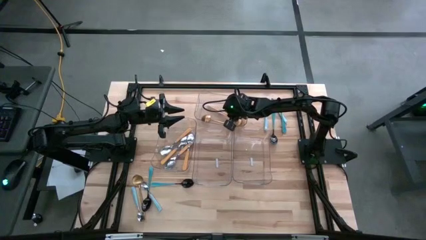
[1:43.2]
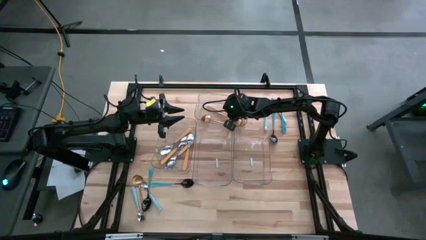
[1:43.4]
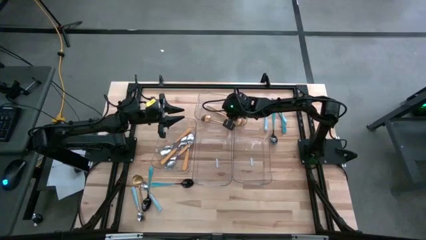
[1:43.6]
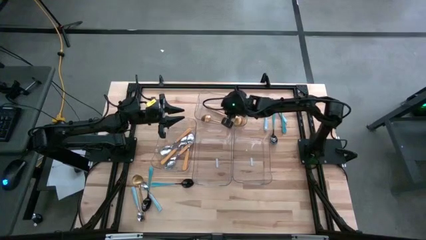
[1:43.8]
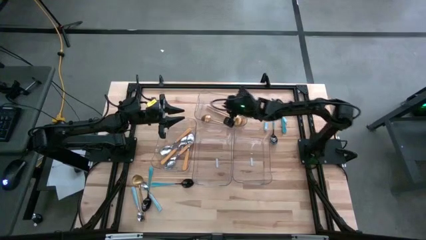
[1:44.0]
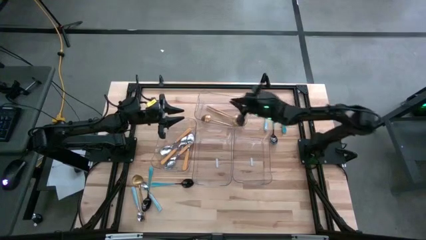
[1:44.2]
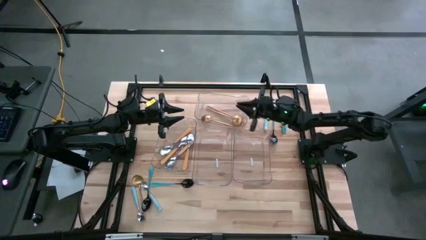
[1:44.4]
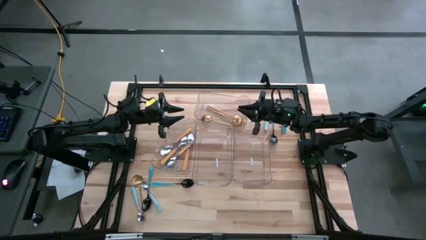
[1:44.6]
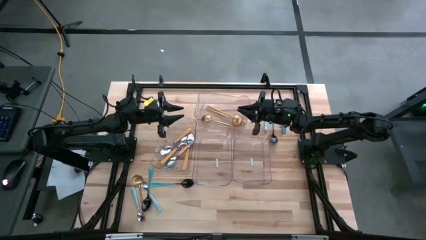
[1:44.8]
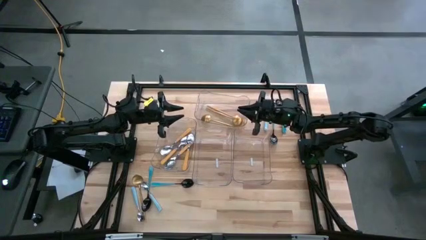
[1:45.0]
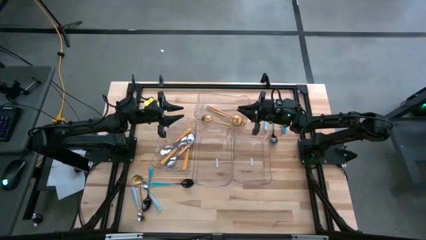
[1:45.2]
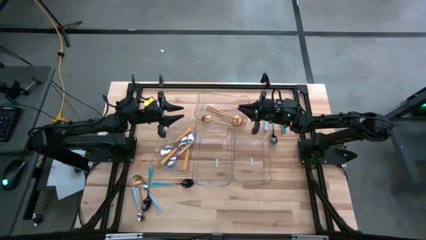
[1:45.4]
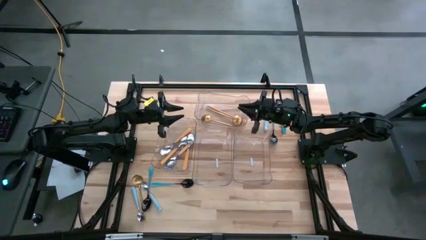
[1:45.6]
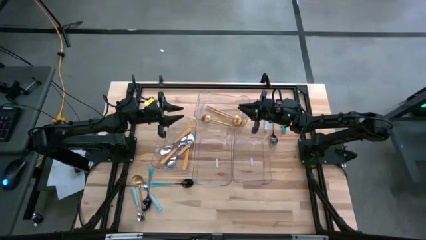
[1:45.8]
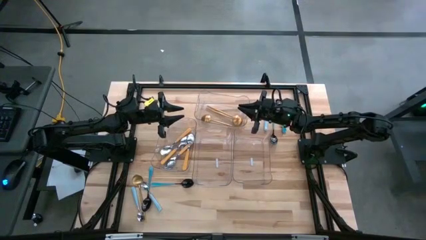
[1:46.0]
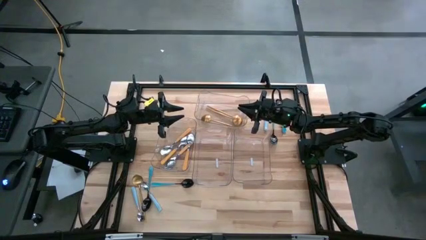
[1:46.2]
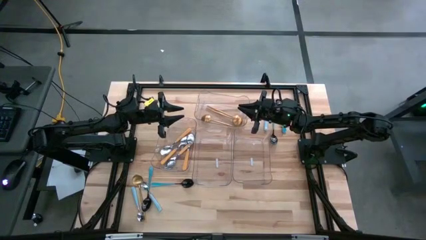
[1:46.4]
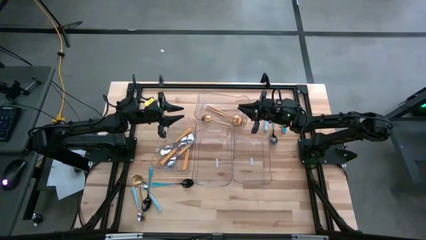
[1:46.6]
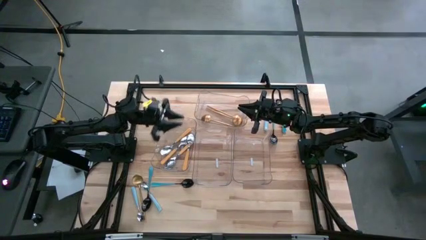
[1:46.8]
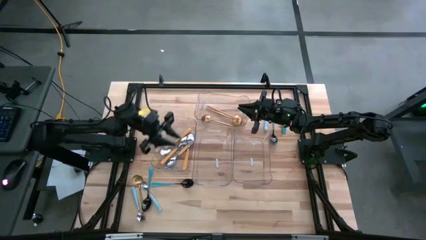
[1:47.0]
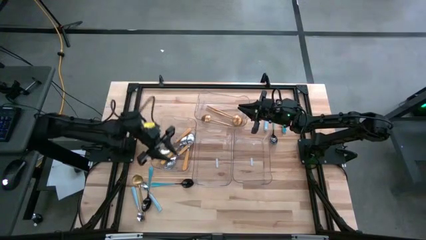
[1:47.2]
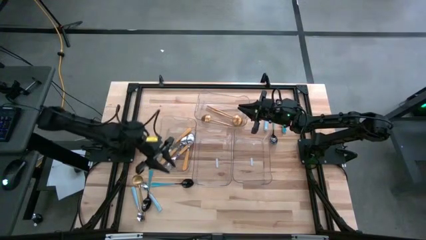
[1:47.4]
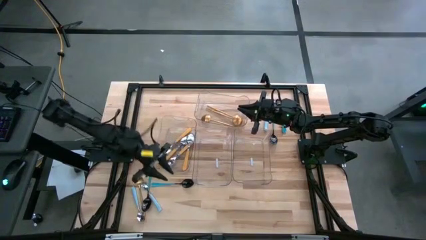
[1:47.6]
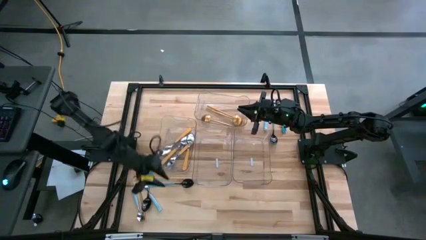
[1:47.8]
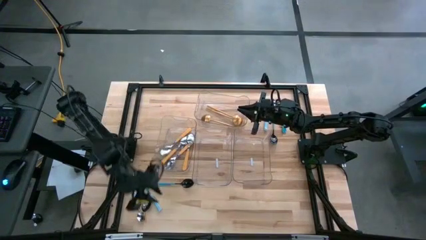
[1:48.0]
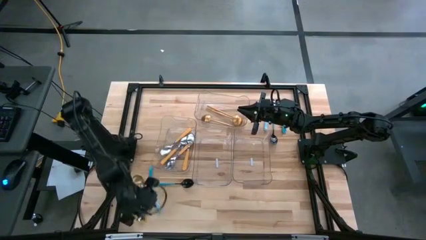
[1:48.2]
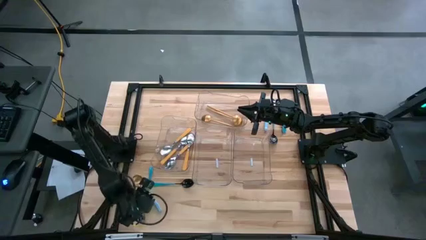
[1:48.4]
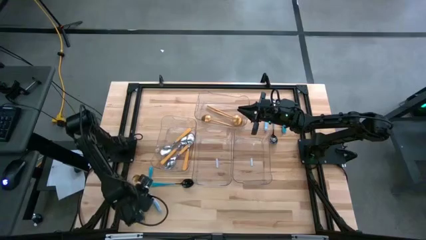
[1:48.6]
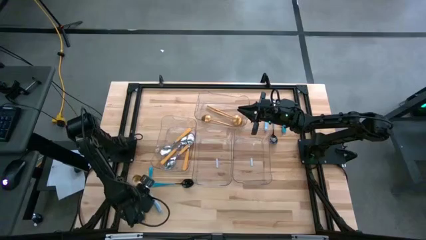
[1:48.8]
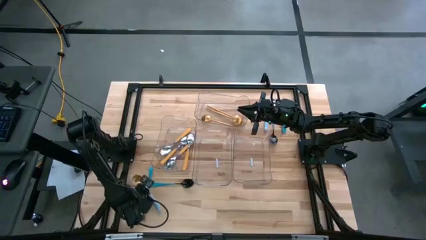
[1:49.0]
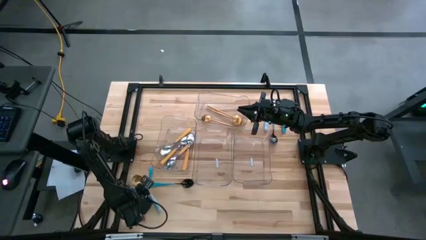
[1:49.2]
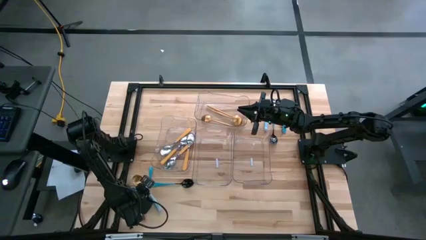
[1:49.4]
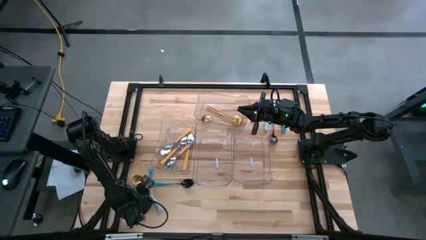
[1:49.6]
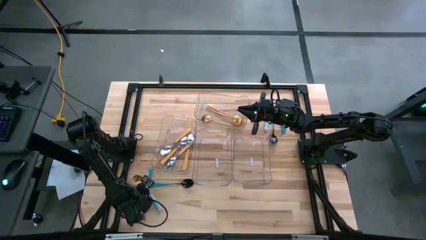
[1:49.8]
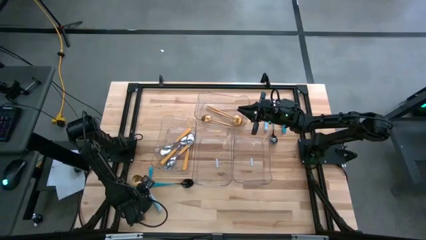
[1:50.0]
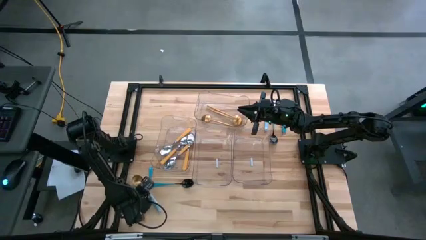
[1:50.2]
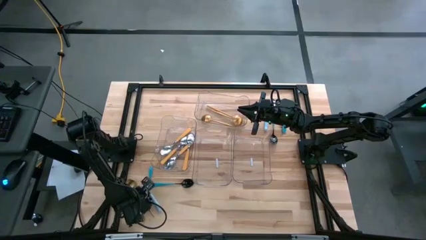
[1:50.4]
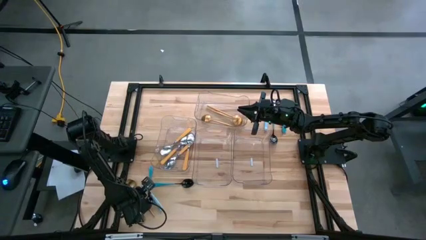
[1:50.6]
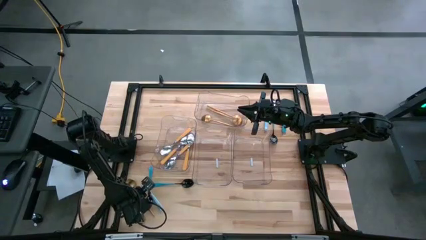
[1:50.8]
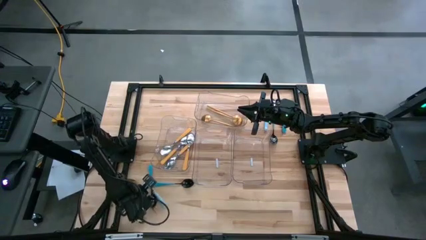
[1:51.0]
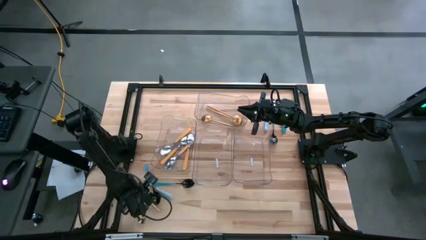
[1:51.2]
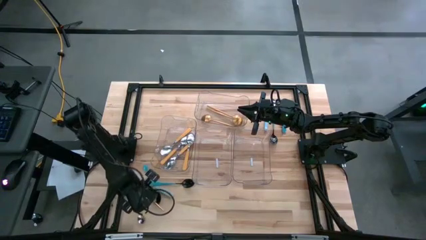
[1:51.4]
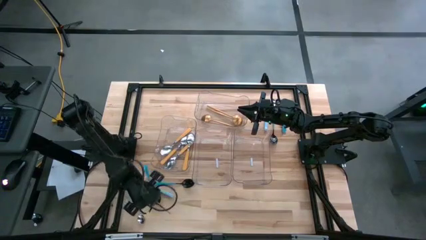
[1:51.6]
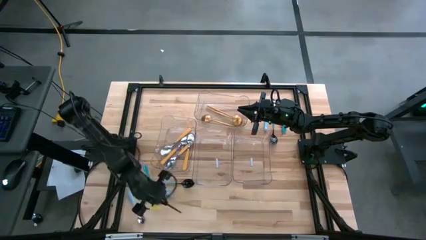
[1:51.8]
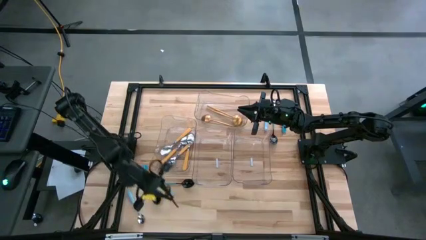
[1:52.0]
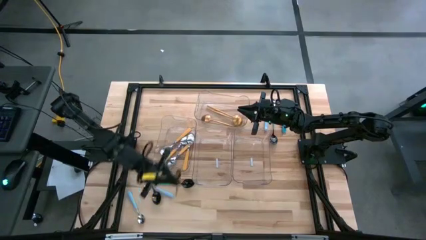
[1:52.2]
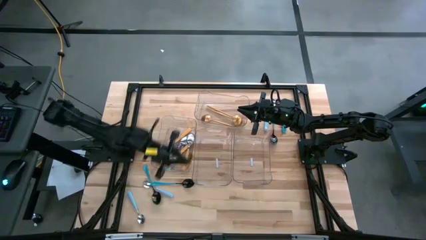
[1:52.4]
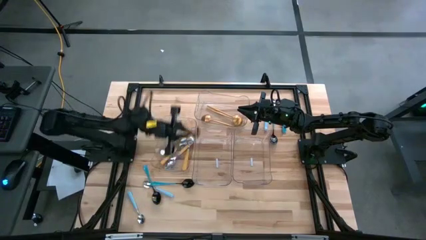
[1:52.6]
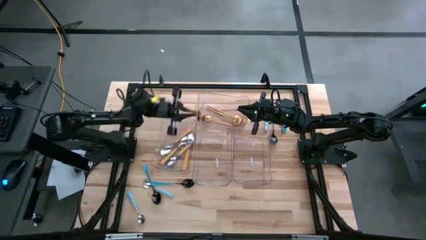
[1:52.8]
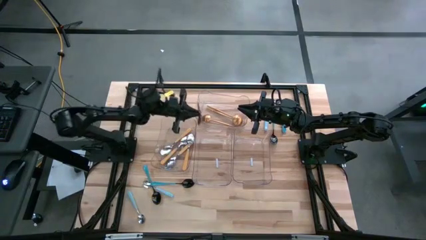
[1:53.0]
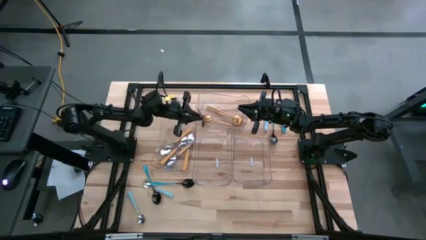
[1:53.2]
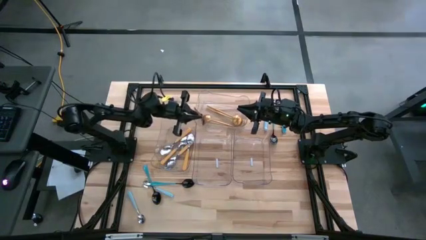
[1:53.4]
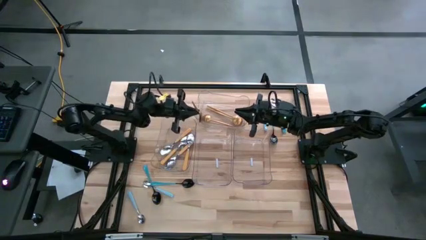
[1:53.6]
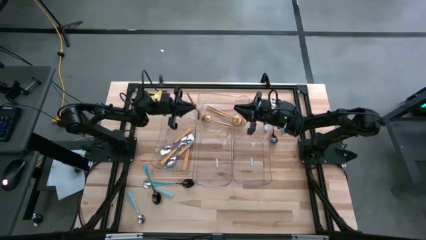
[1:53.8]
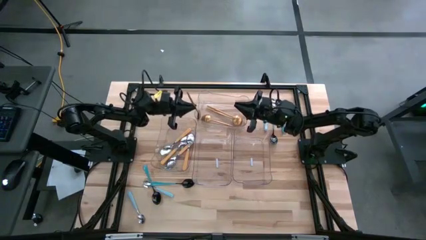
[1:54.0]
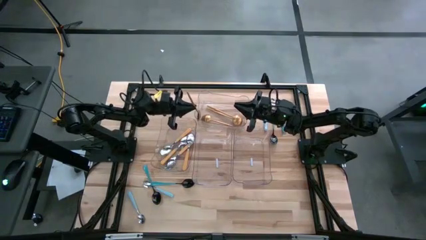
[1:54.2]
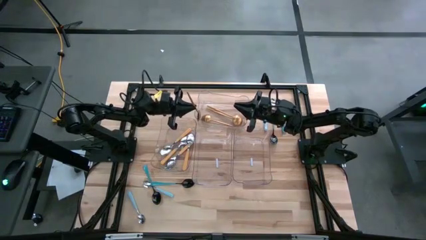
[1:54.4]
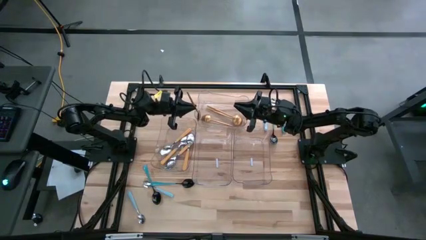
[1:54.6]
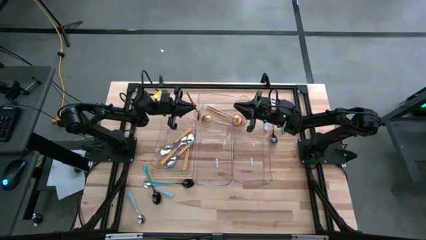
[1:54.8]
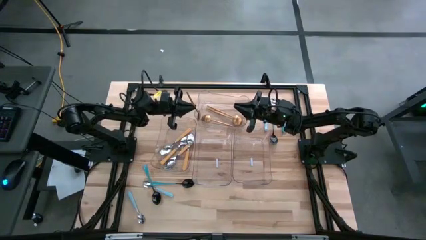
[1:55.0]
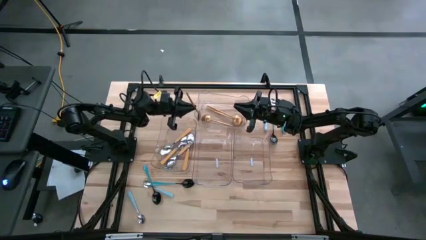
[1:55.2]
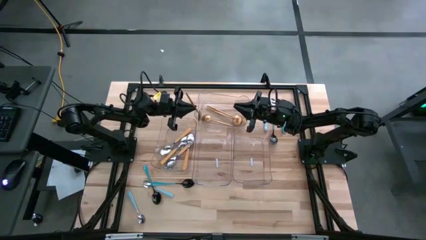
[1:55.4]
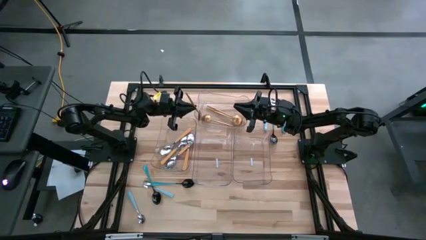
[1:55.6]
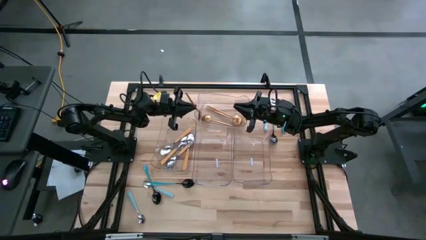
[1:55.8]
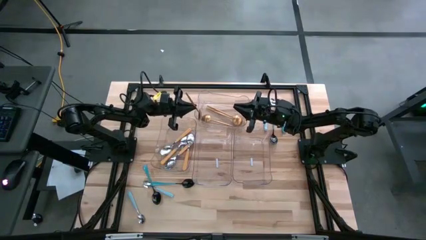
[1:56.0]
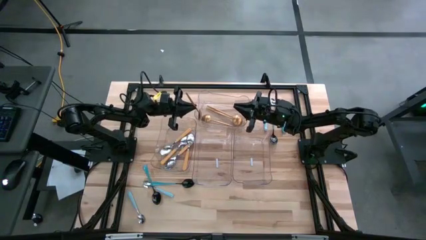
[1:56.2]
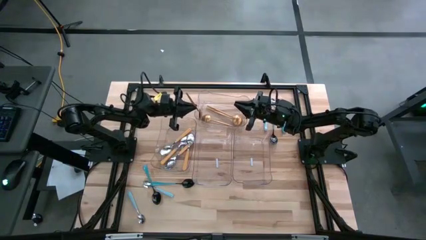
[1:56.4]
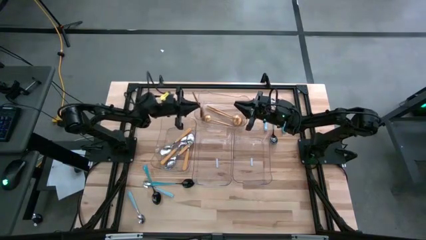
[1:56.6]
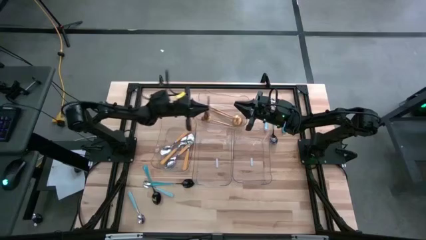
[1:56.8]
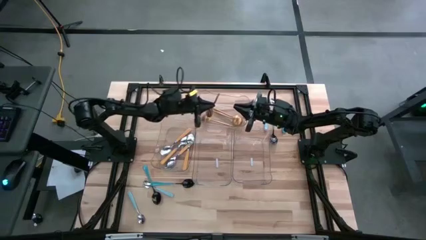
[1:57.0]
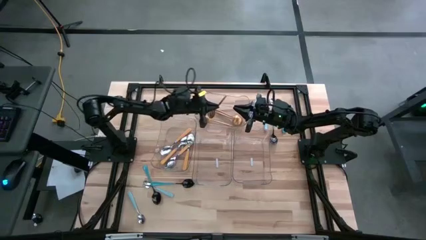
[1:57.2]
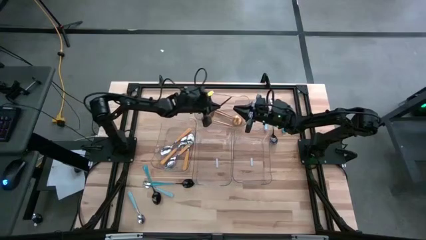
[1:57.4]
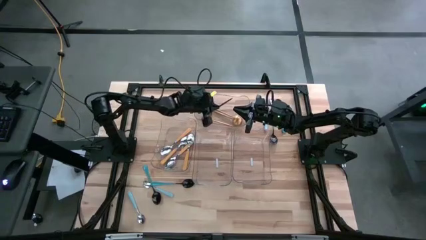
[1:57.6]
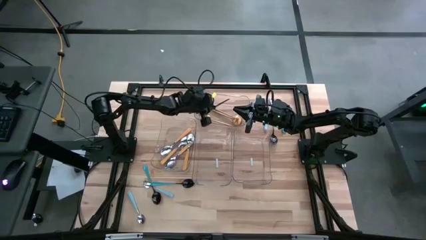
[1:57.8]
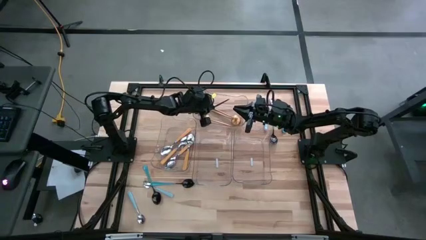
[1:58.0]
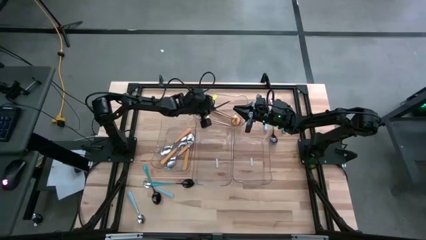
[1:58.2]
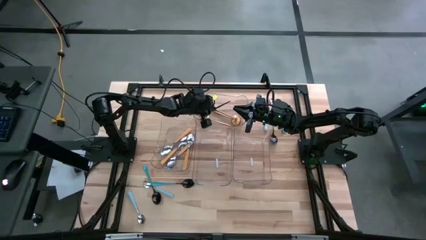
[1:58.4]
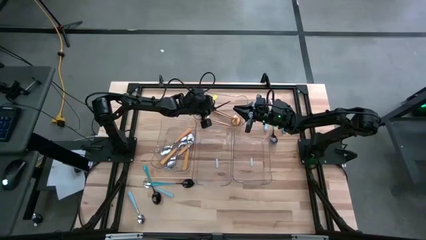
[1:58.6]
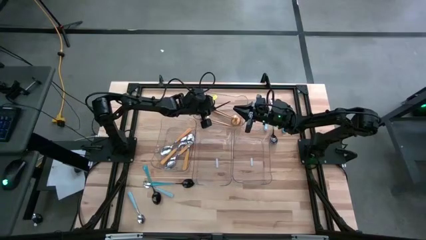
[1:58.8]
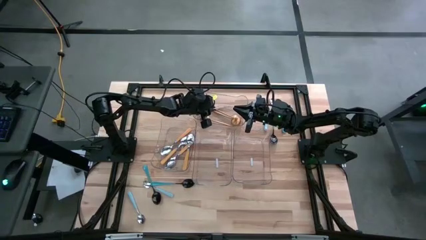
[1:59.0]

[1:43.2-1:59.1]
Task: Sort silverware by color (type)
Put the gold spoon into the top transparent bin

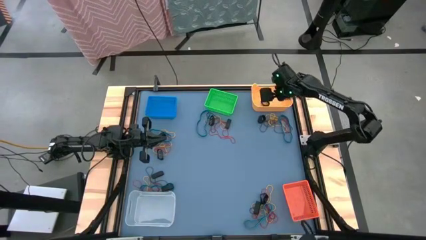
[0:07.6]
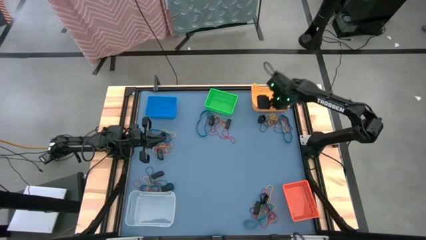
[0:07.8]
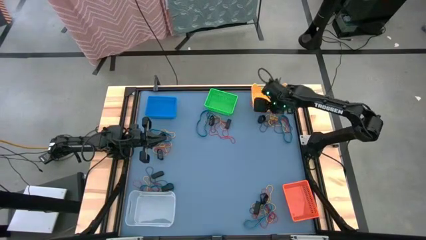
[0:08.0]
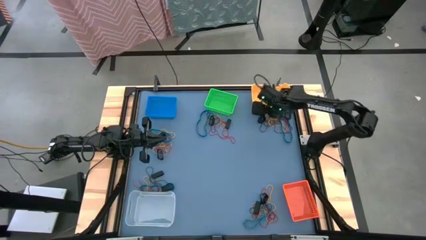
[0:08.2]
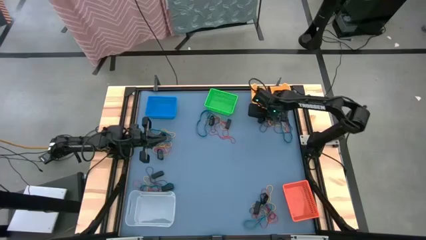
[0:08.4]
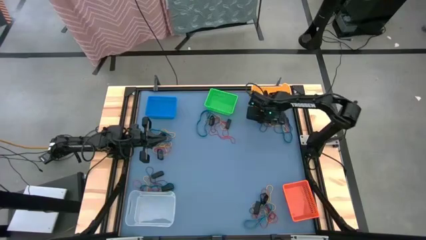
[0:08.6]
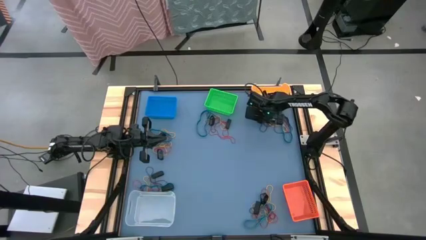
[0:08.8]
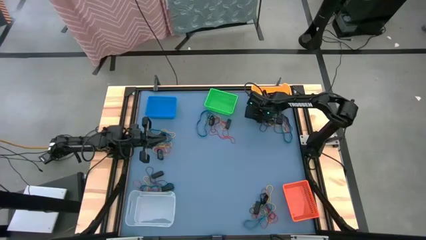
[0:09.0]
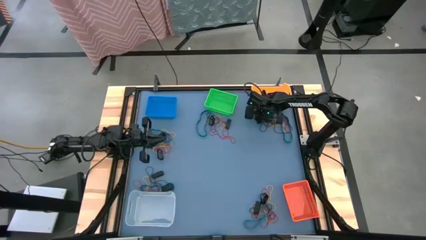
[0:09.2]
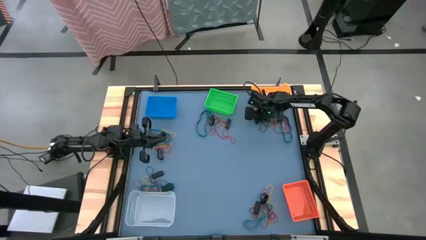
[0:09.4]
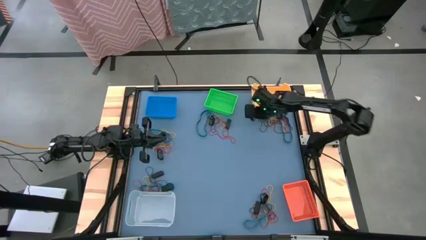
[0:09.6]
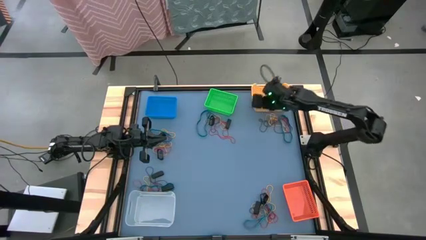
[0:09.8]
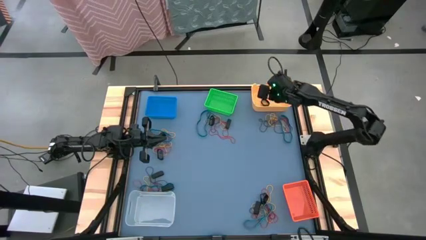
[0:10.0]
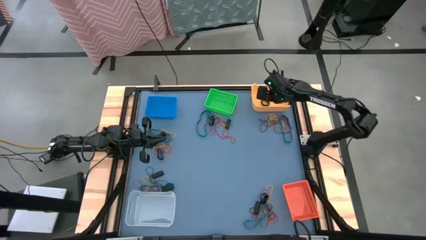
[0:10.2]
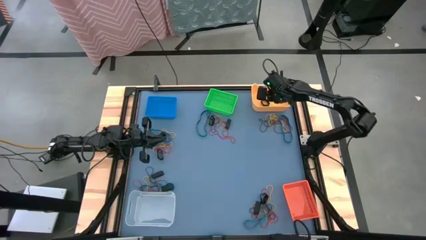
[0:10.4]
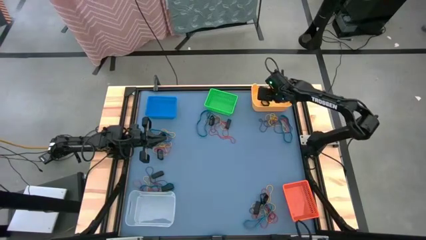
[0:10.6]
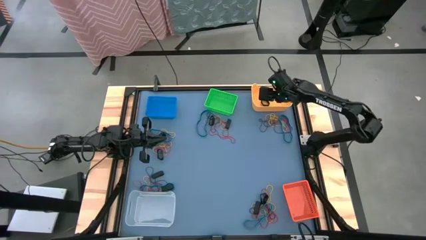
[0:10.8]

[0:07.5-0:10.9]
Task: Sort rubber bands into baskets
Put the black rubber band into the yellow bin
